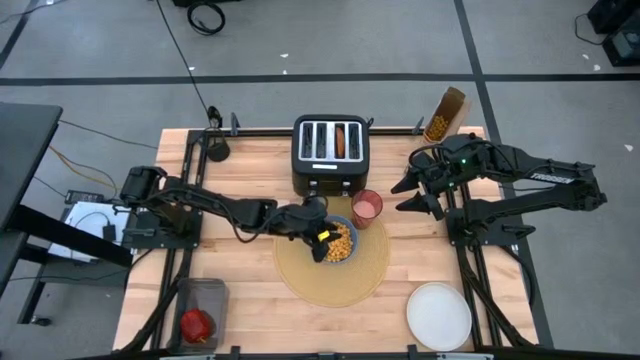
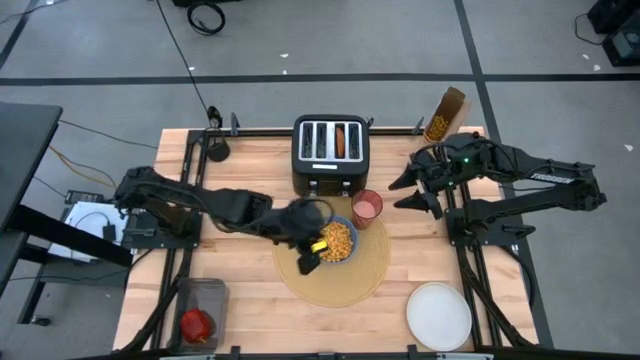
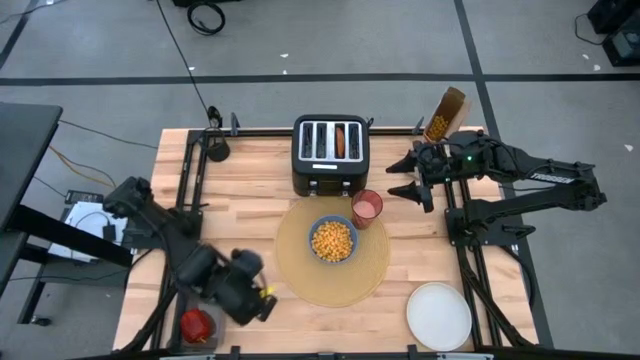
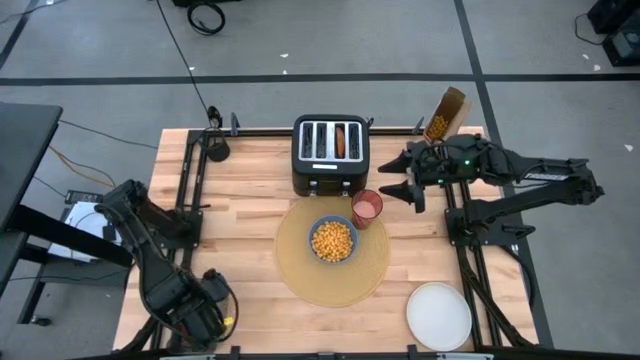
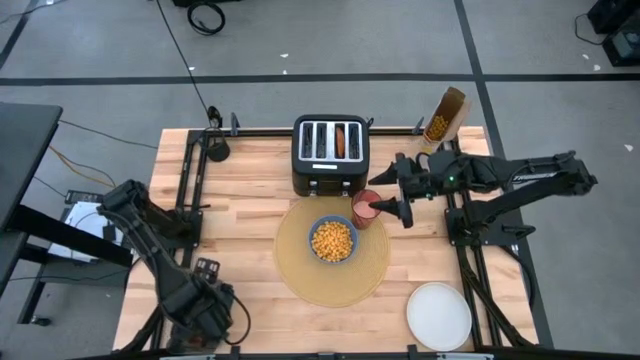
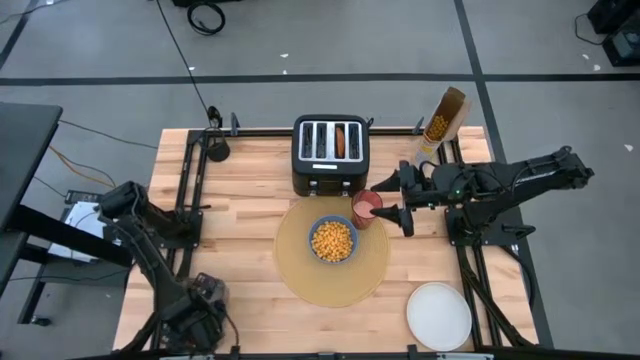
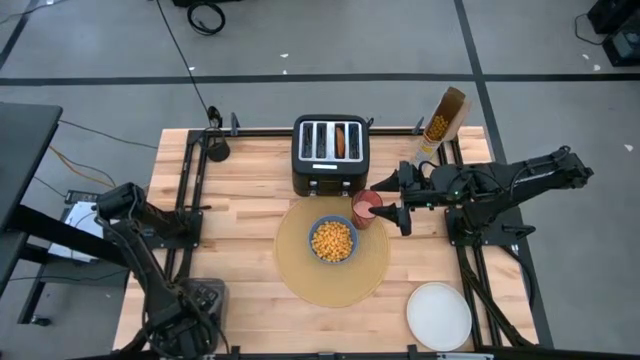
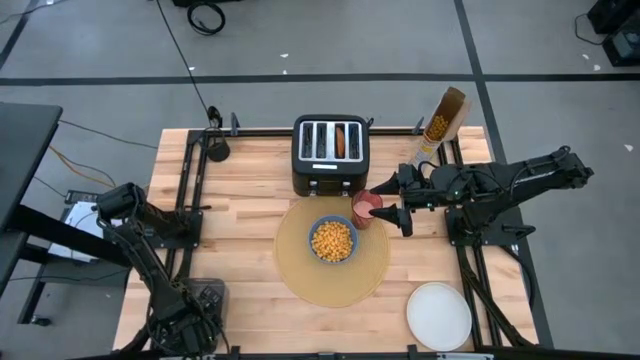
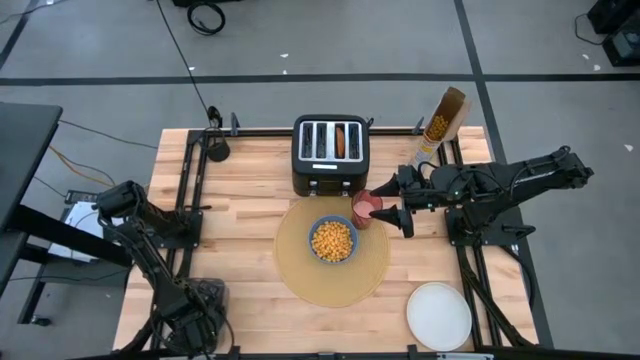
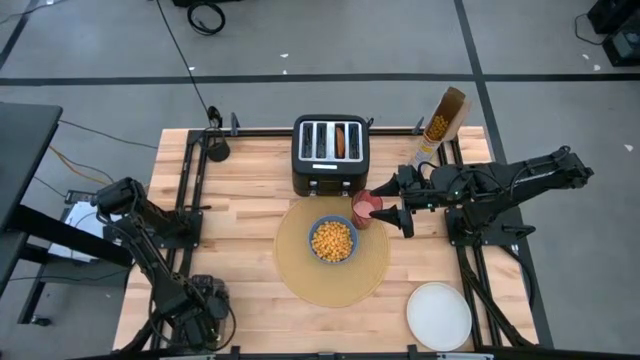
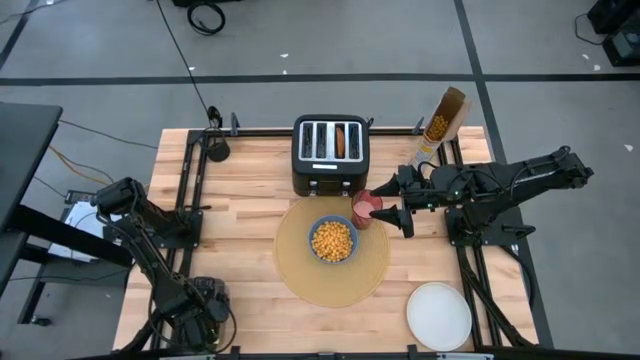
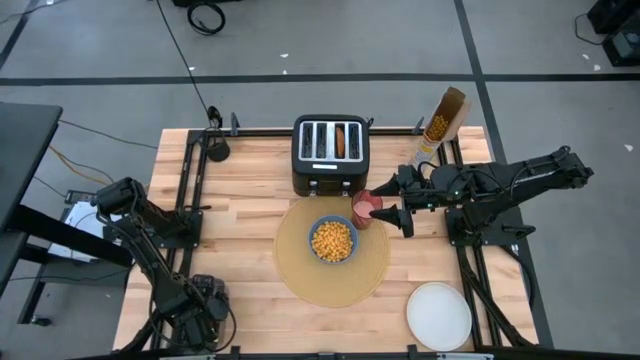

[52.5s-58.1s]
Task: Arrange a breakfast setting
Put the apple on the yellow tablemat

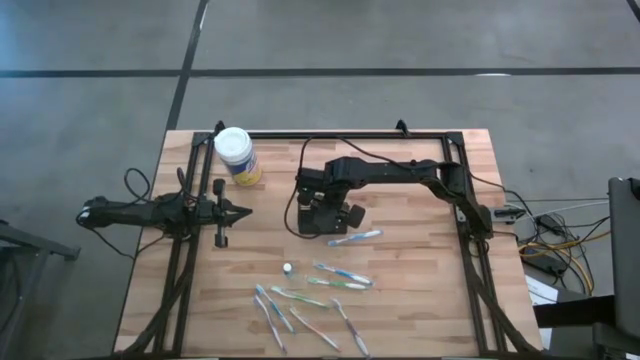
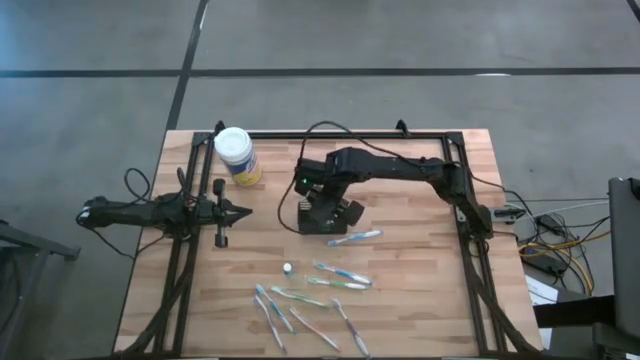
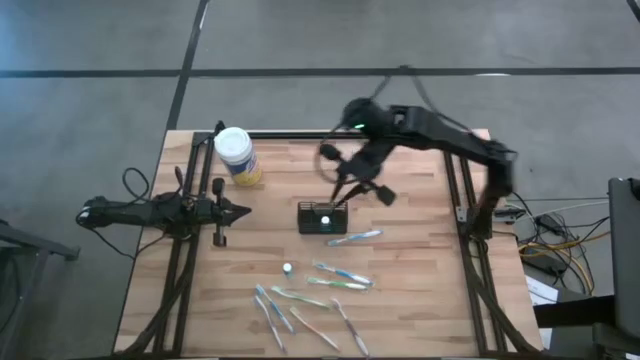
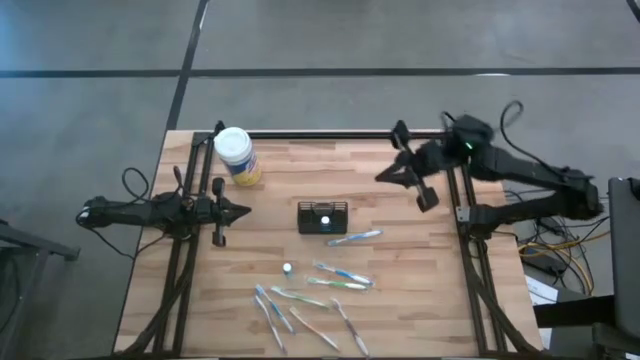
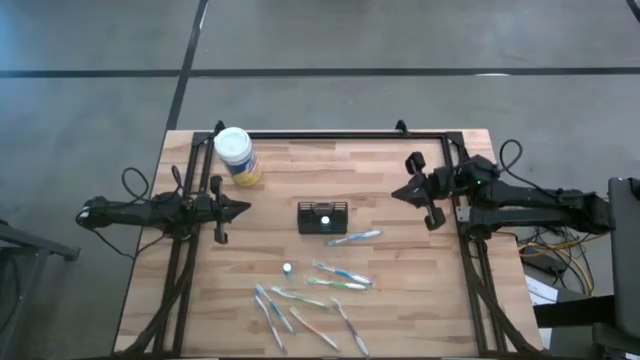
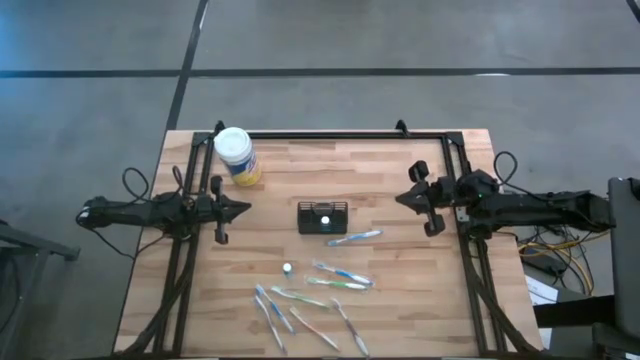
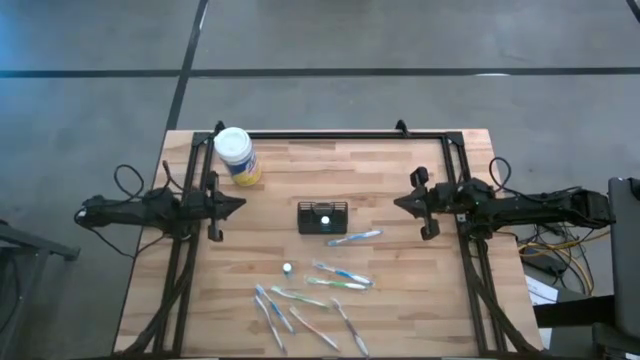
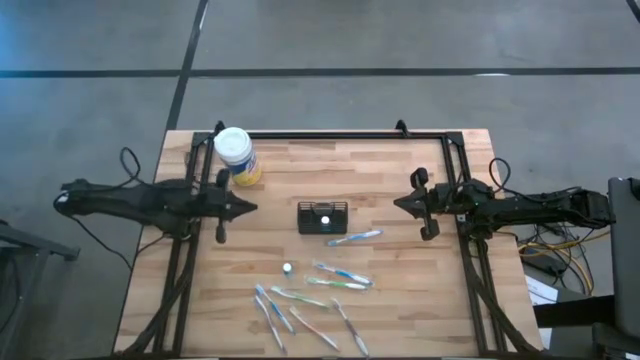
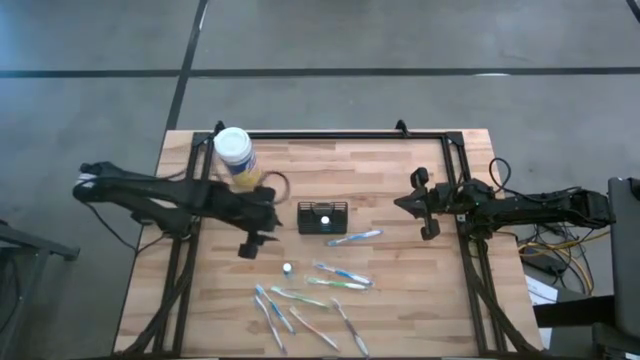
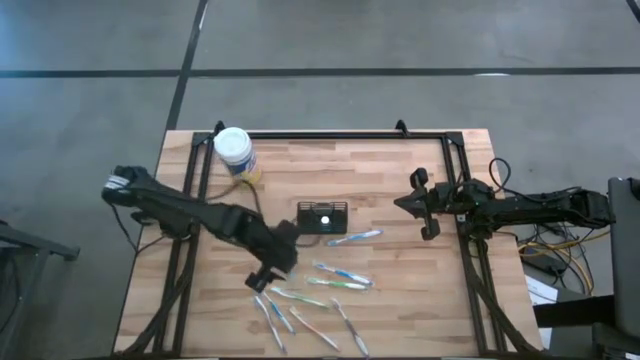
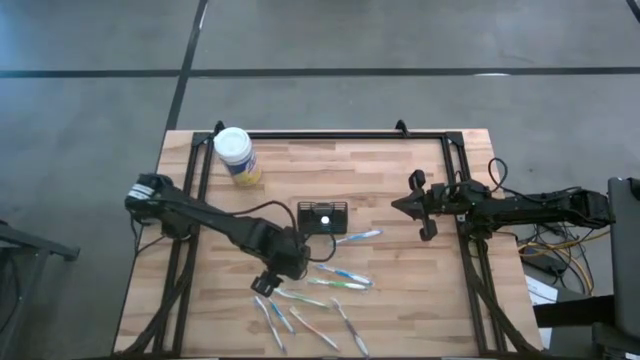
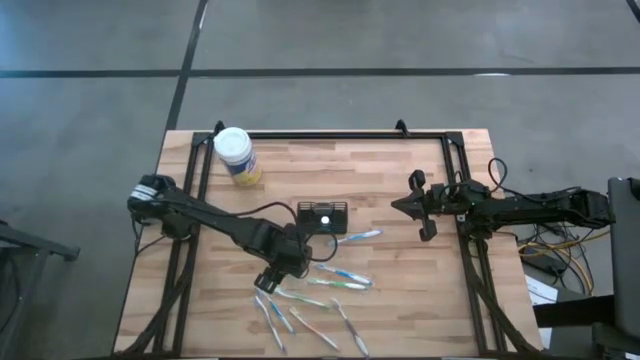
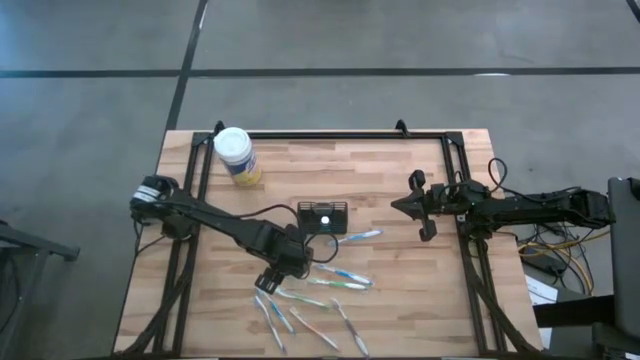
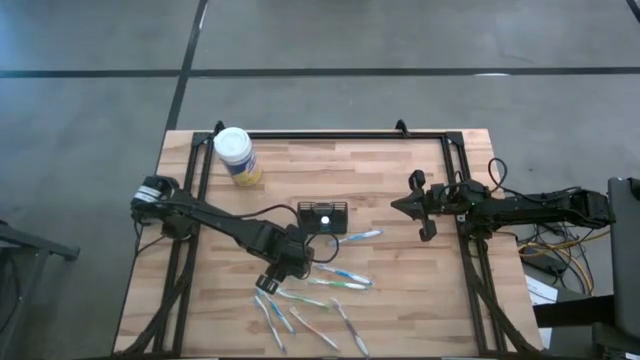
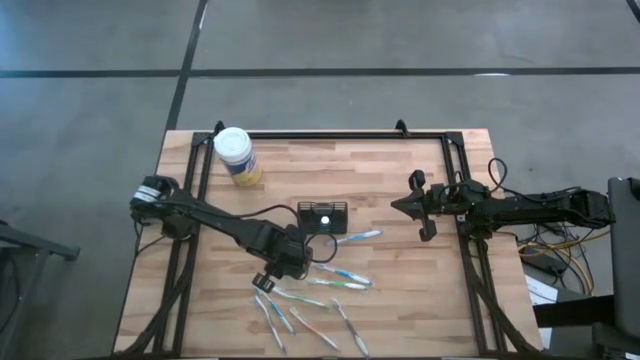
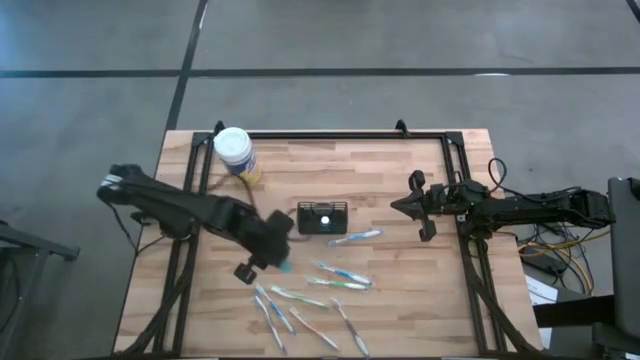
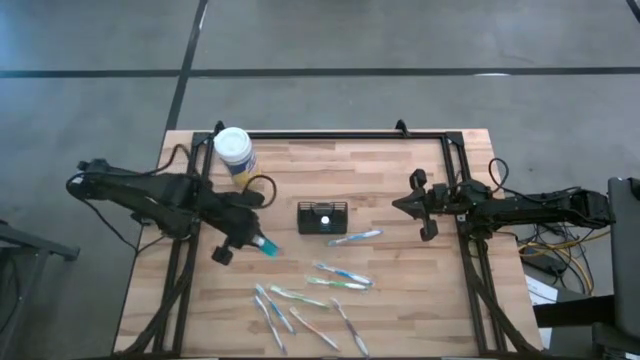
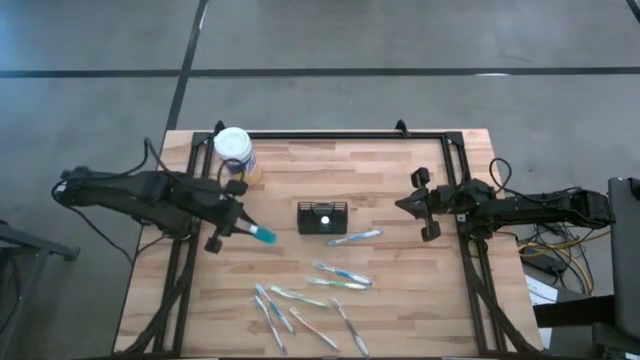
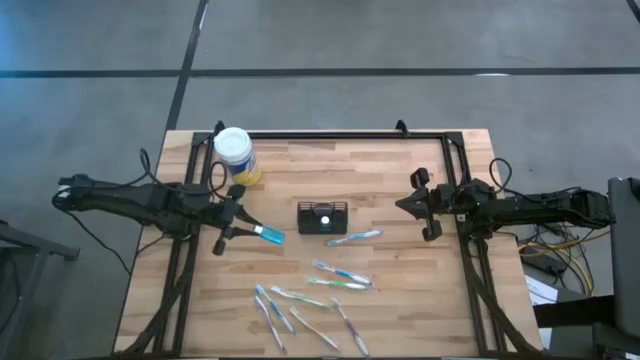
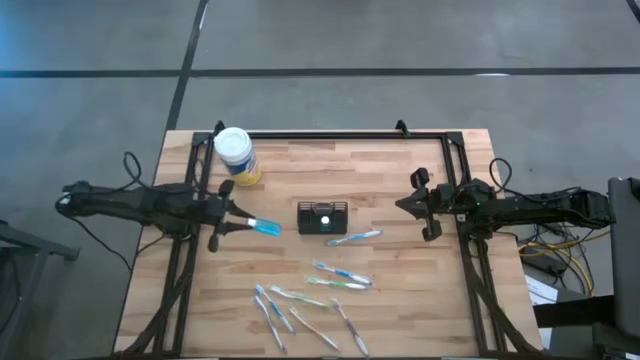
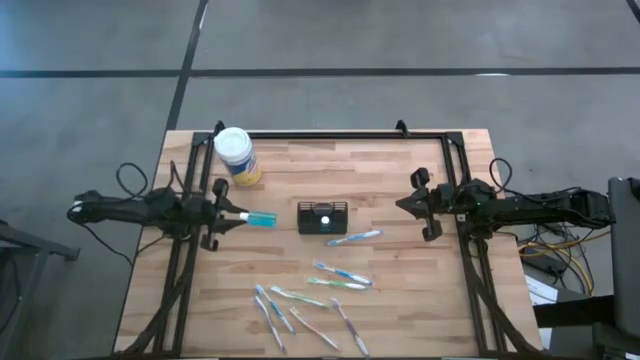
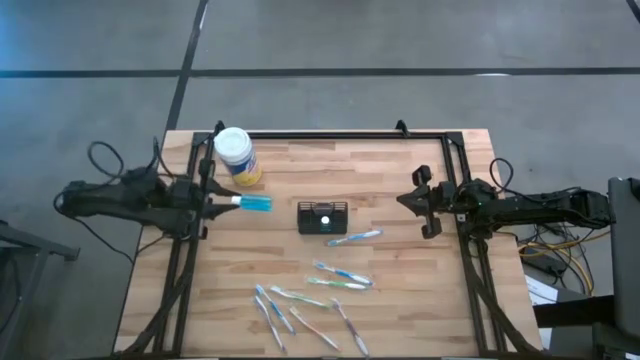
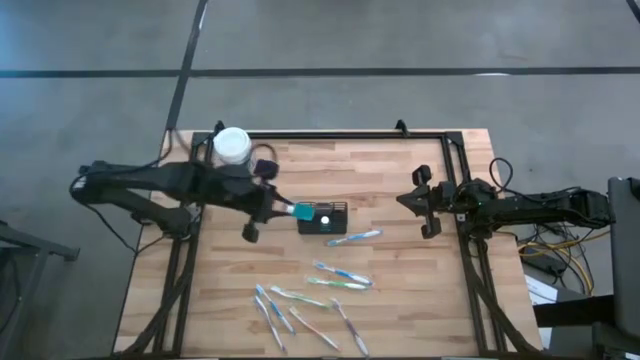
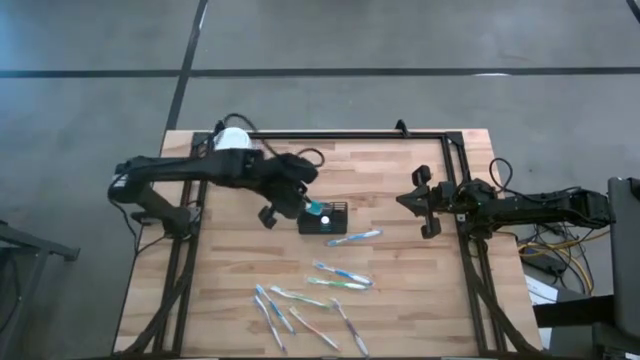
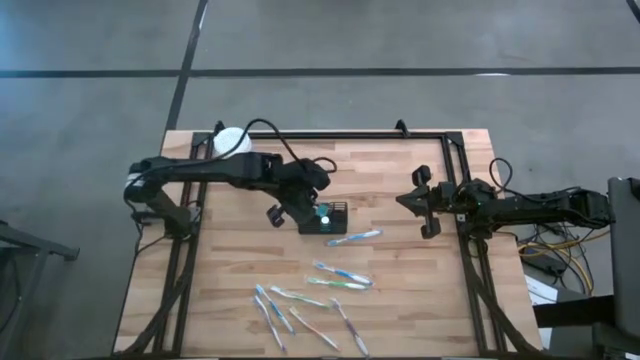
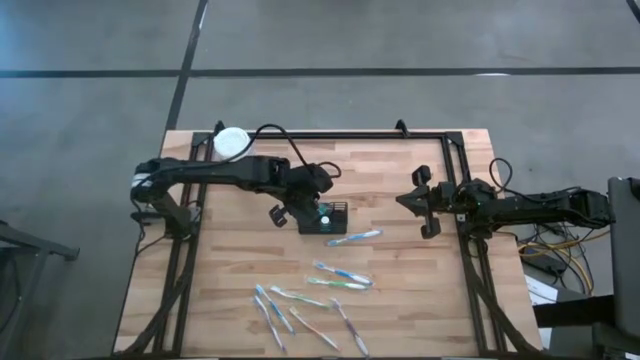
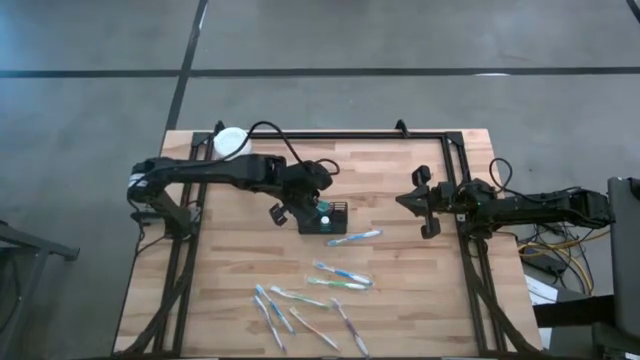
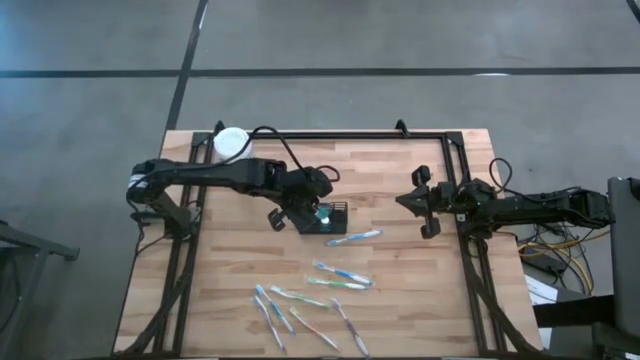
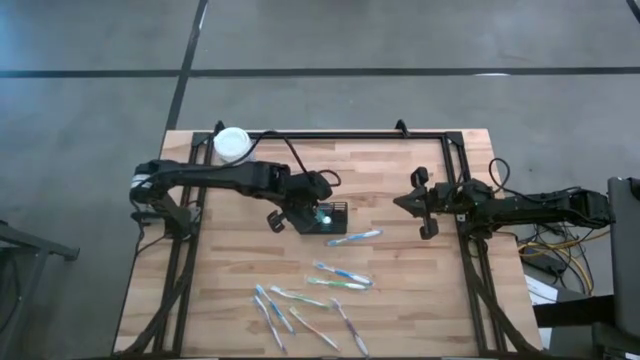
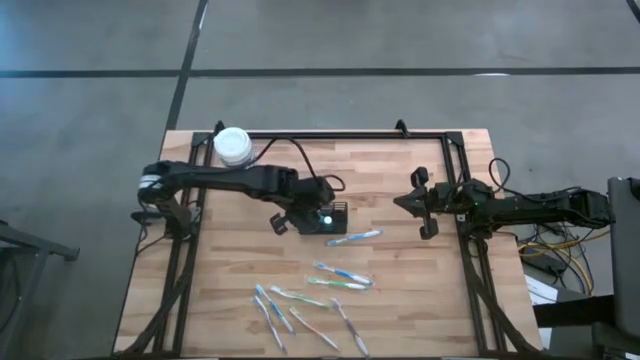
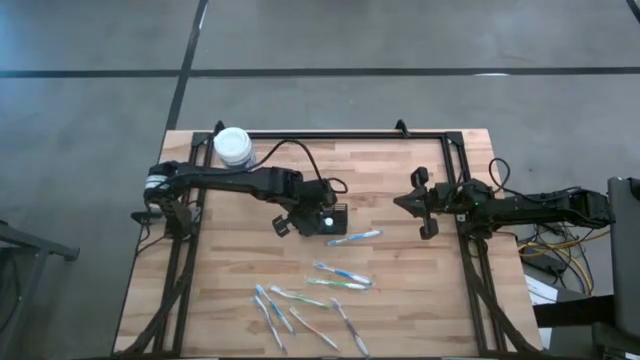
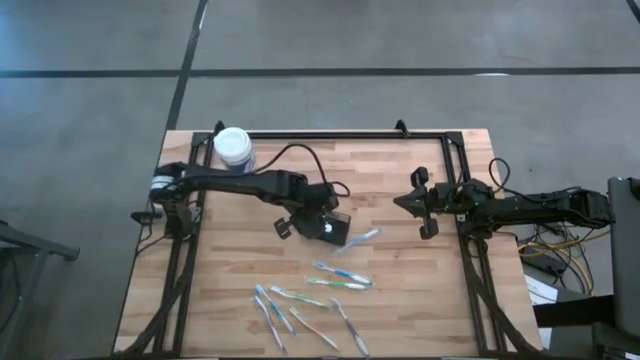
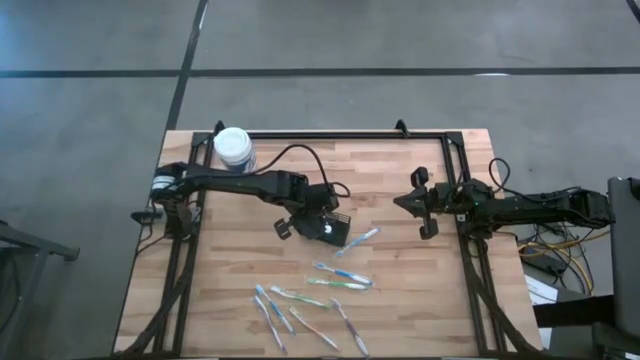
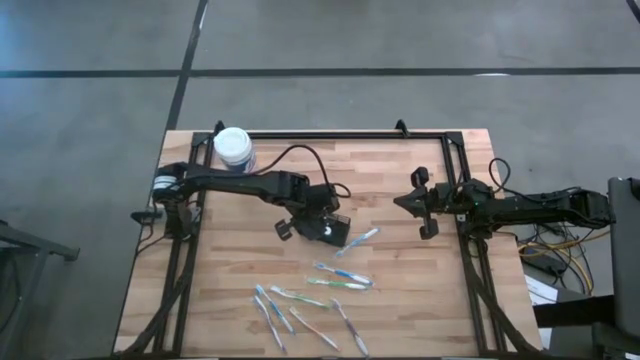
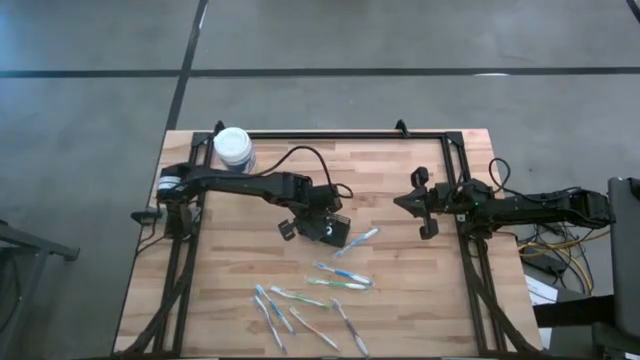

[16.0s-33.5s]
Task: Pick & Place toothbrushing station
Put the mouthwash into the mesh organizer
